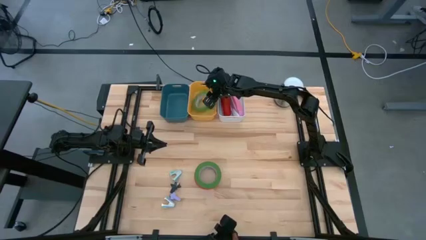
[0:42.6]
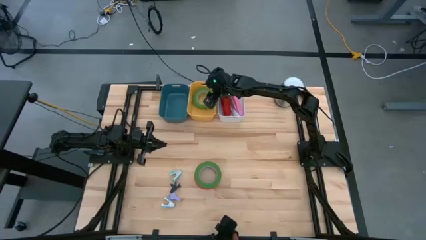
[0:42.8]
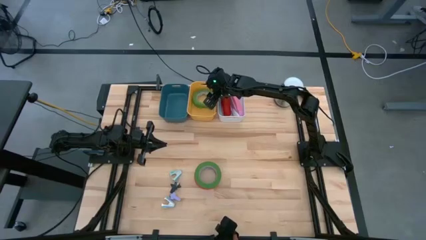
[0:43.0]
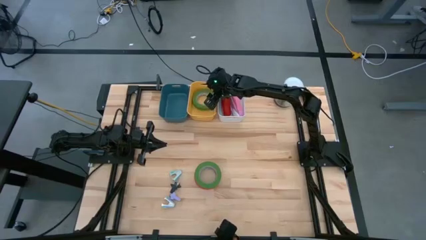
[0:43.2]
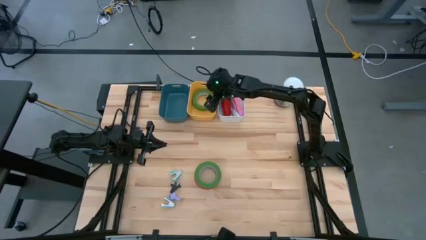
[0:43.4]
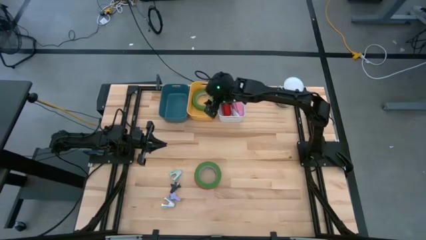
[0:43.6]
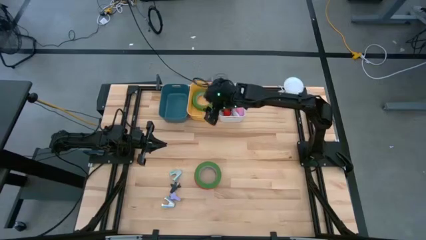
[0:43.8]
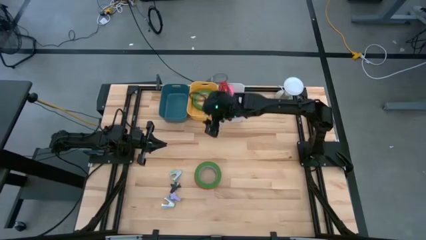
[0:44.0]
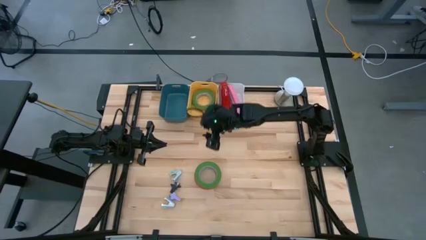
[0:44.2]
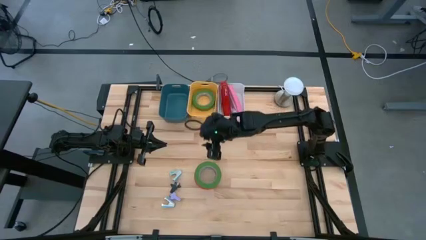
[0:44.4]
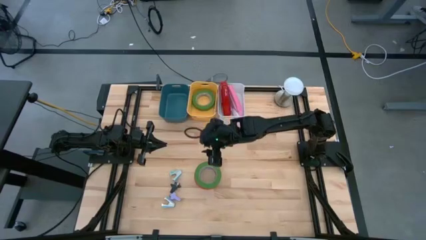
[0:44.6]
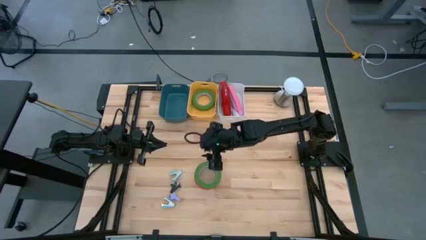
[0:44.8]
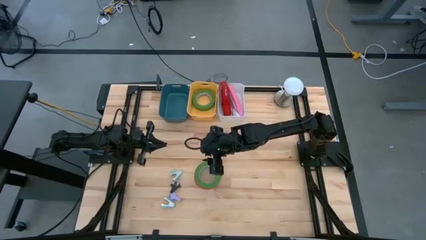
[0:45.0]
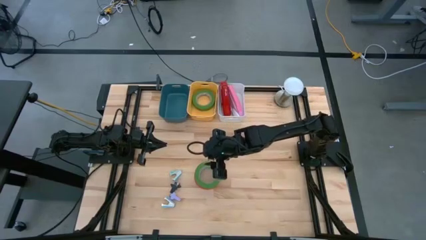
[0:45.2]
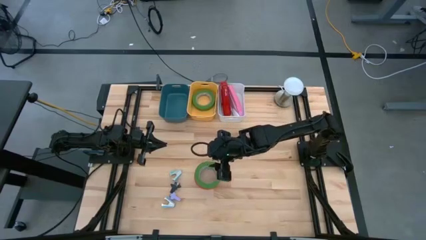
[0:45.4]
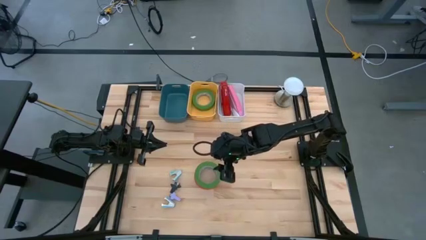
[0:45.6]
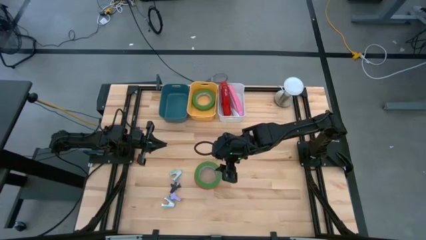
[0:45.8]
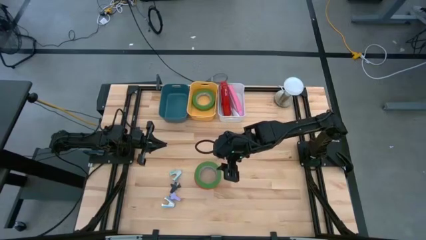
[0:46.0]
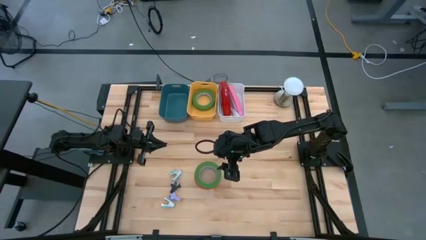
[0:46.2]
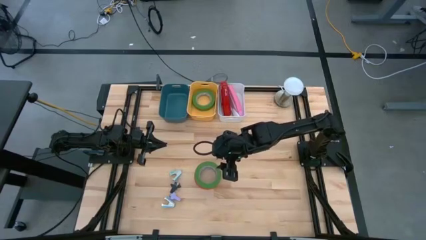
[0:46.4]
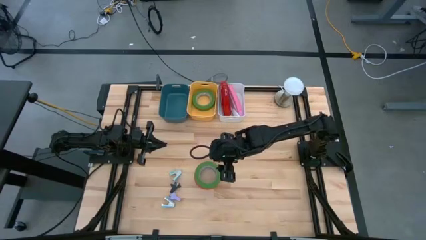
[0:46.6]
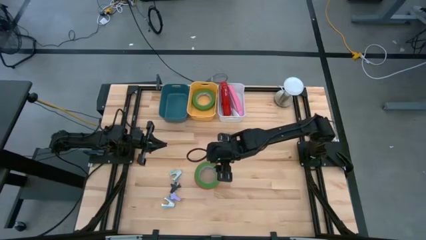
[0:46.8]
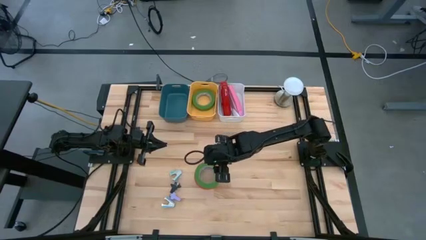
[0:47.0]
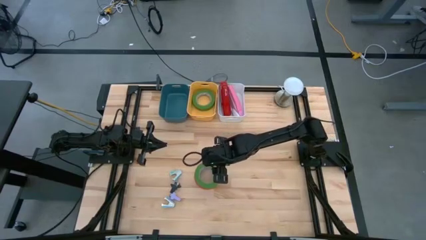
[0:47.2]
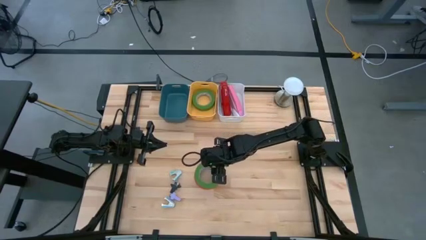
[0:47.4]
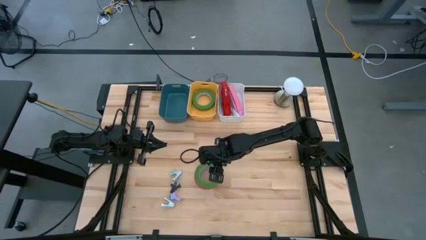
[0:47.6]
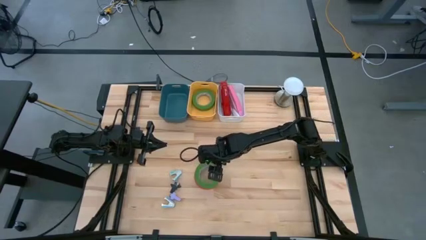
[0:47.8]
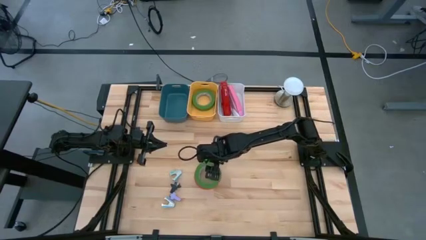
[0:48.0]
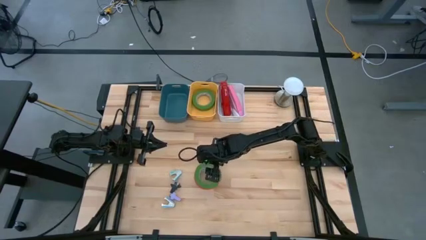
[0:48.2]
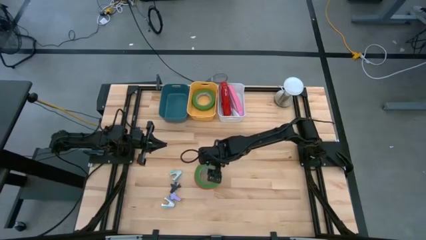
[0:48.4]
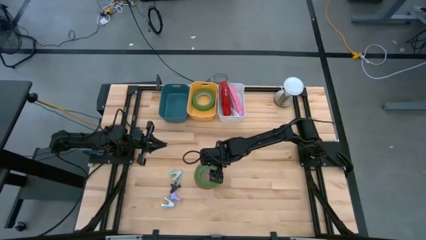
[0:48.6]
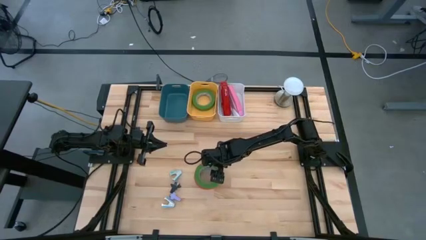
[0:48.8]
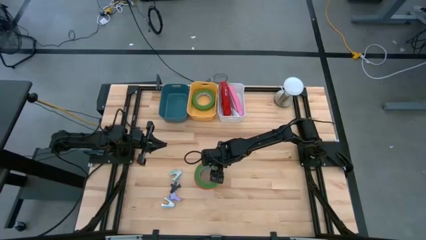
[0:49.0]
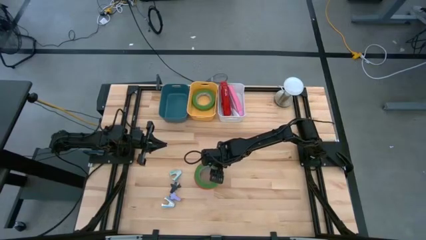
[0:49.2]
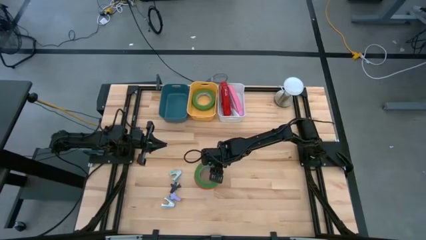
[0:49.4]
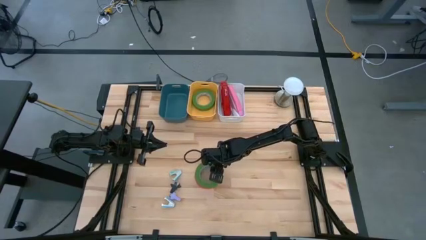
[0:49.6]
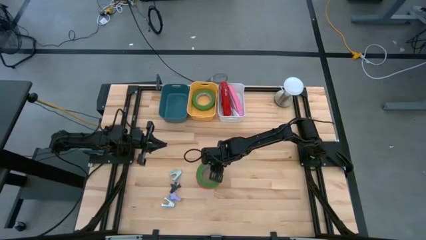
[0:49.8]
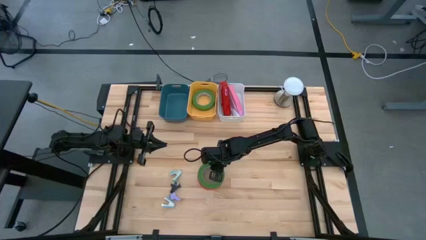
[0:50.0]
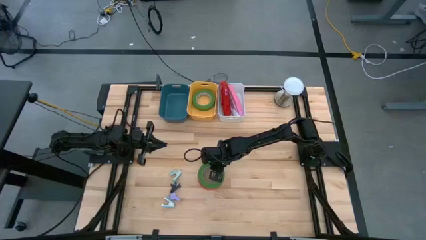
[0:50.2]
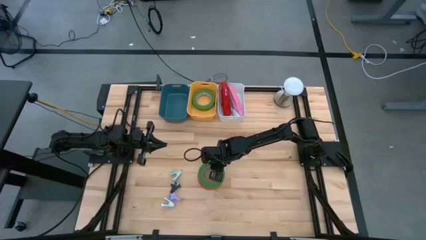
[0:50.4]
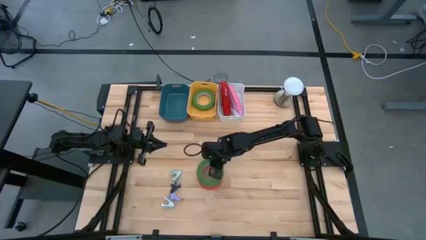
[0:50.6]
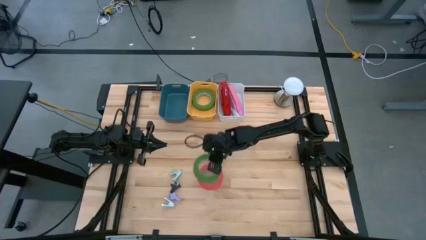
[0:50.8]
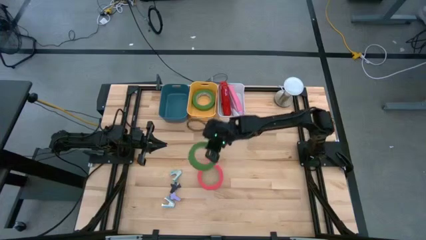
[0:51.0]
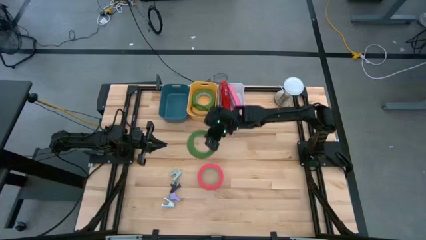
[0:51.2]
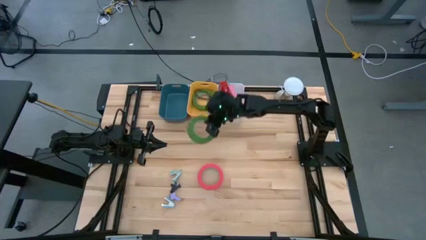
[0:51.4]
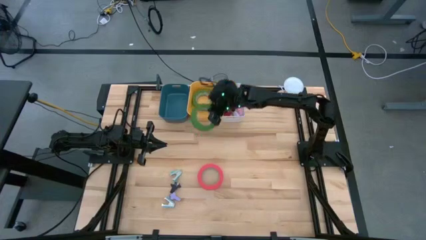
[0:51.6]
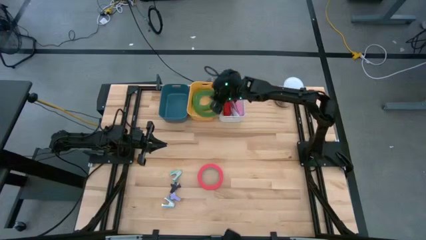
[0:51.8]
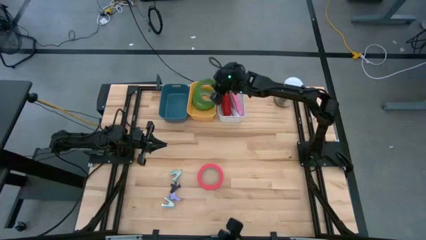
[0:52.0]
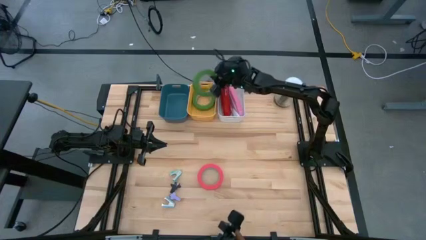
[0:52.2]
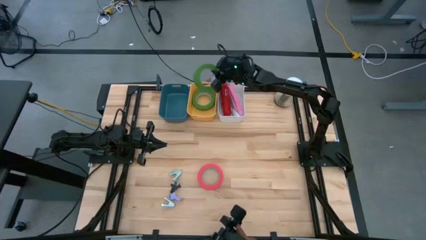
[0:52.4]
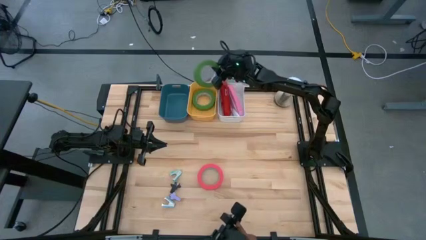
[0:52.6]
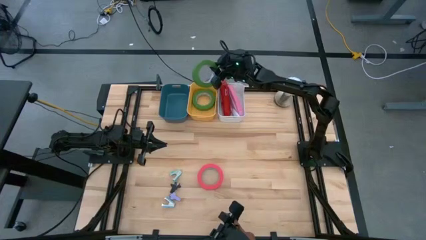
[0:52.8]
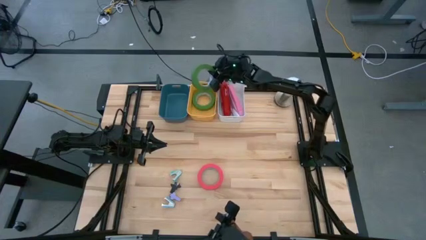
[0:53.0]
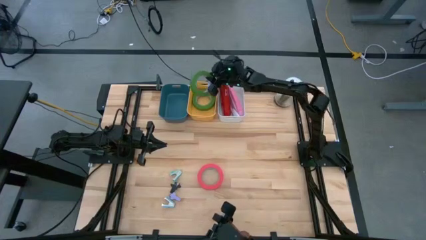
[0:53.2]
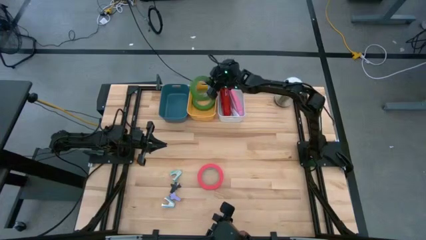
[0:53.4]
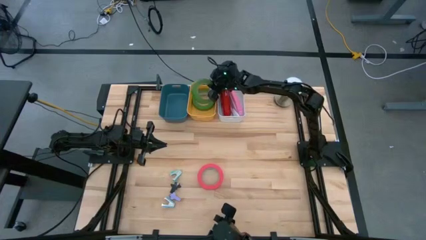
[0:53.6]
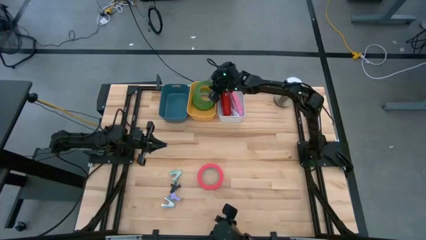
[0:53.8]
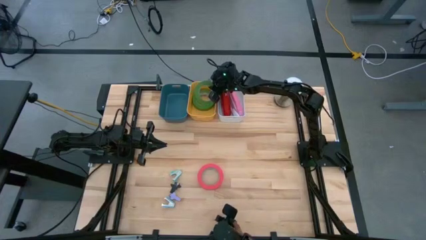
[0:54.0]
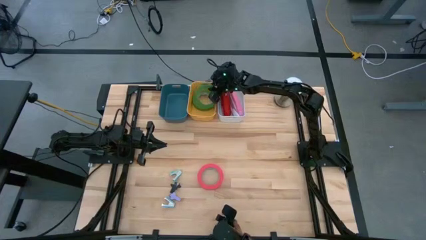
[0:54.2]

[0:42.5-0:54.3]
Task: Pick and place Stapler, Stapler remover, tape
Put the green tape into the yellow bin

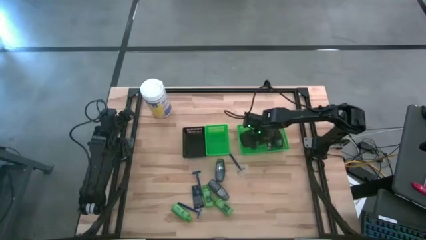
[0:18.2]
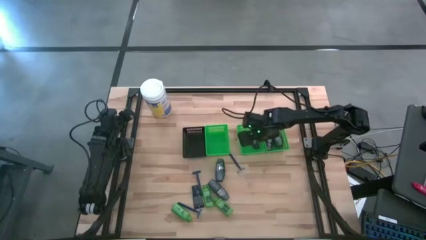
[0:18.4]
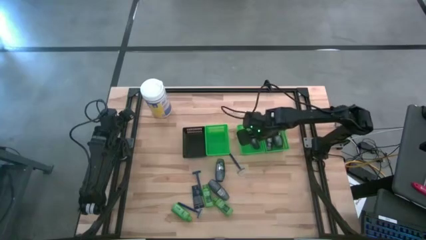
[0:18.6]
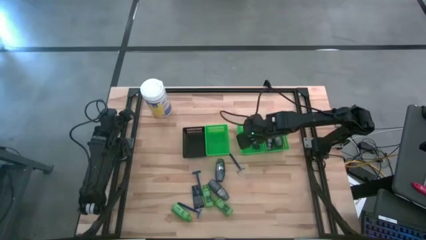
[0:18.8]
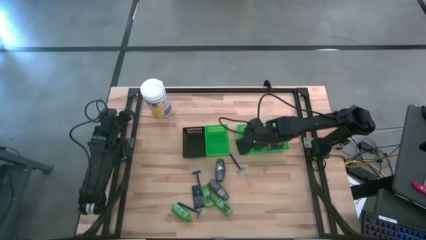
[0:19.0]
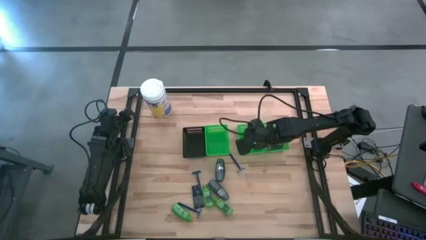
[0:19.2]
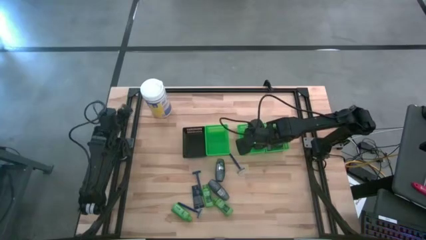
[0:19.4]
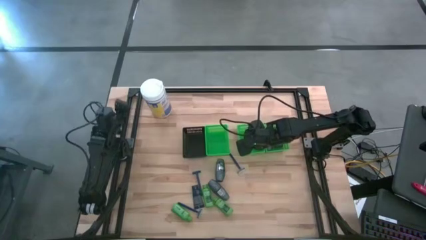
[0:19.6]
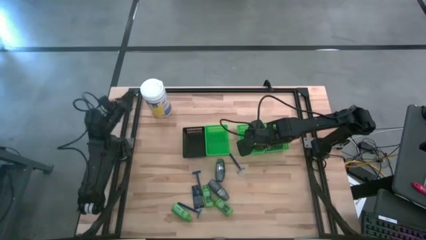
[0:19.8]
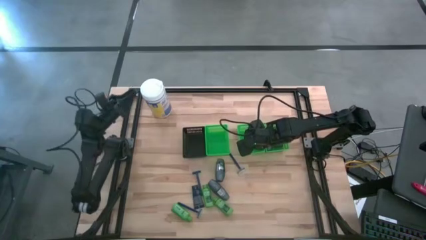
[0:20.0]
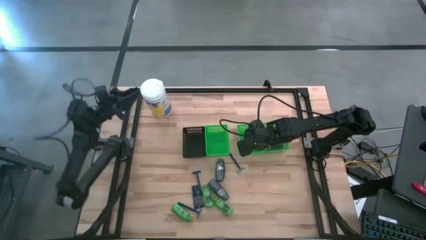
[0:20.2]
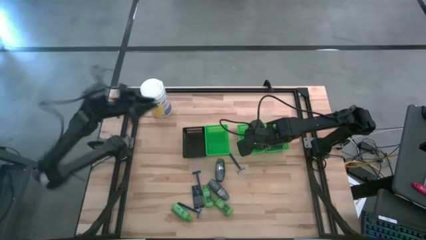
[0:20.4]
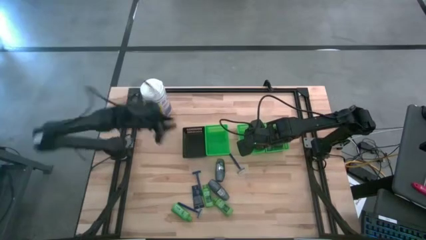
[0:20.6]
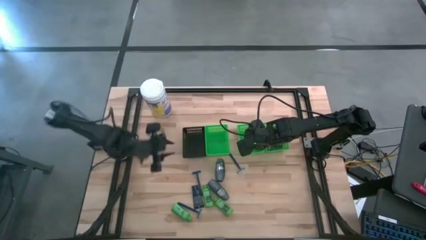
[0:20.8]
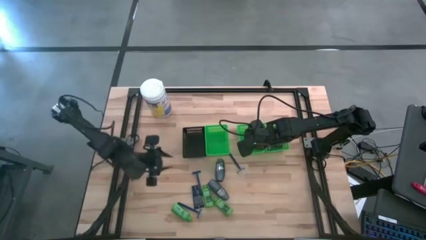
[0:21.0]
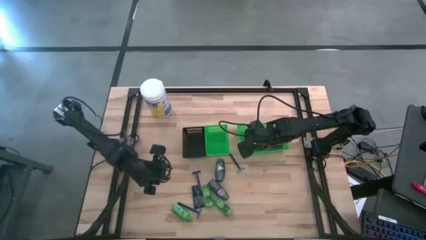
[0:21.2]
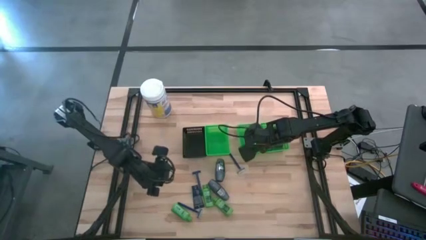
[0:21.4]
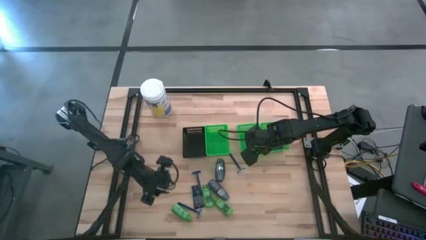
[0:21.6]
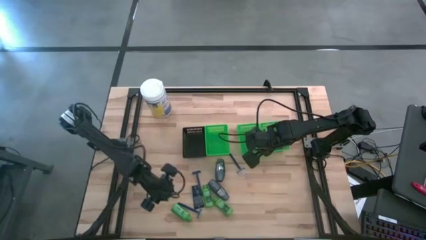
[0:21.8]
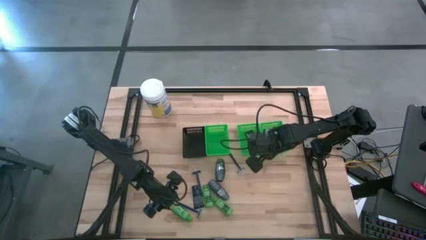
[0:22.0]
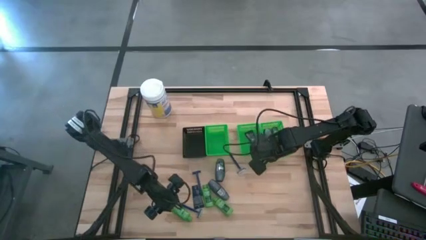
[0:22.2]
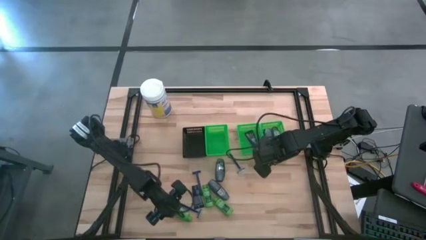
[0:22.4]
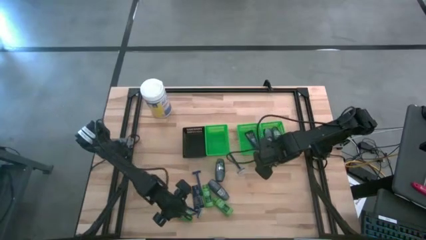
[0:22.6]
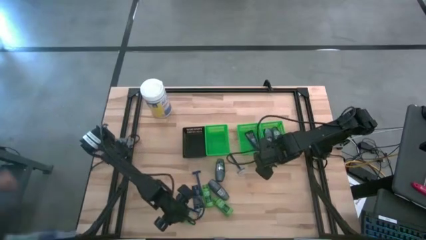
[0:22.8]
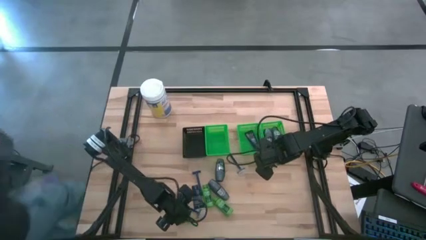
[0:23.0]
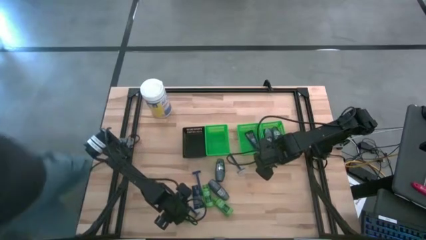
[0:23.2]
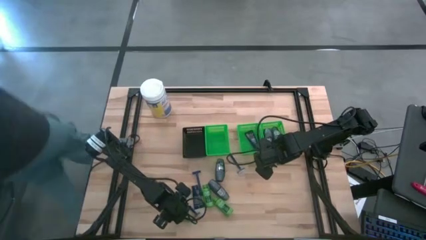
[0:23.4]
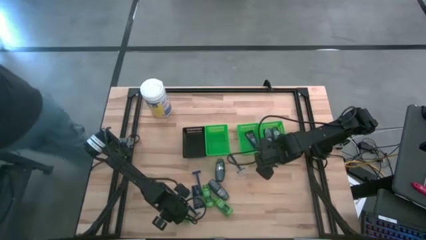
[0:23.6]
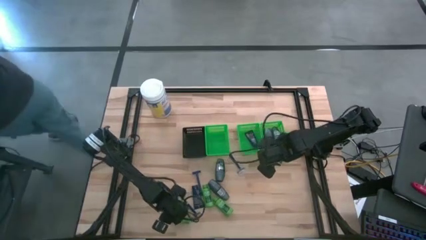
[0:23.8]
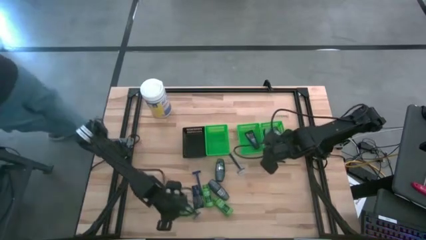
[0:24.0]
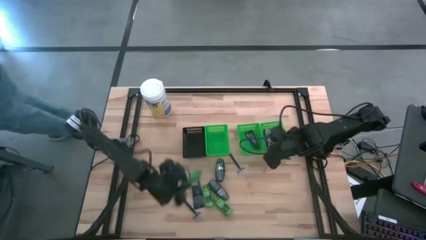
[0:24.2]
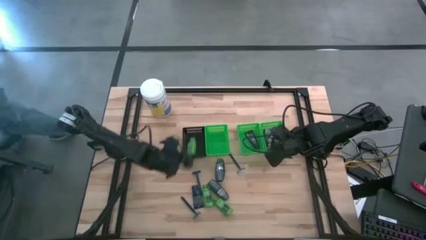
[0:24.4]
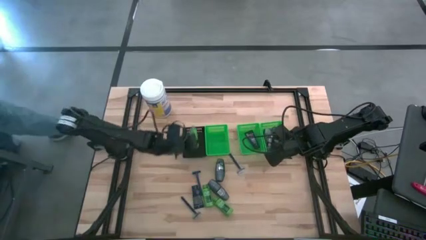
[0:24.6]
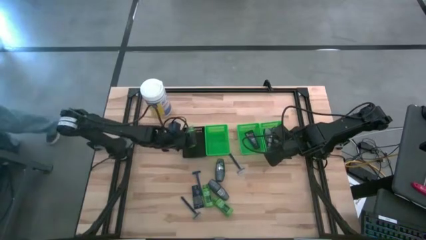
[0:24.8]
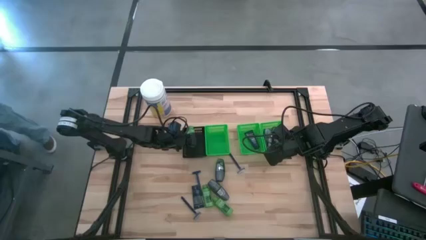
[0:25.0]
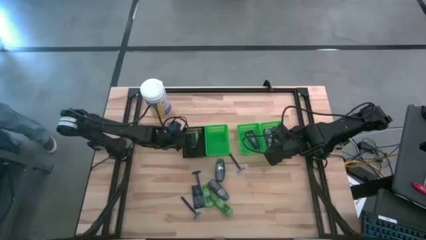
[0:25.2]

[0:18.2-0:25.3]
Task: Pick & Place Travel size toiletries
Put the green shampoo into the black bin
